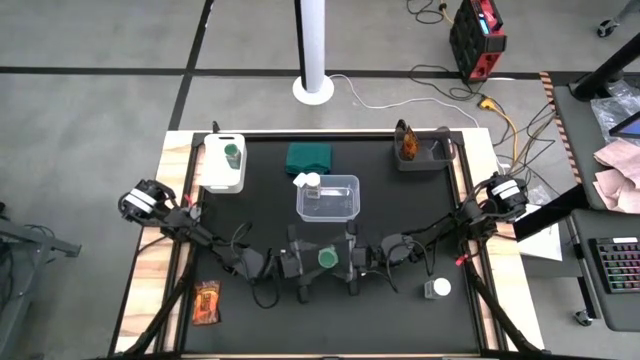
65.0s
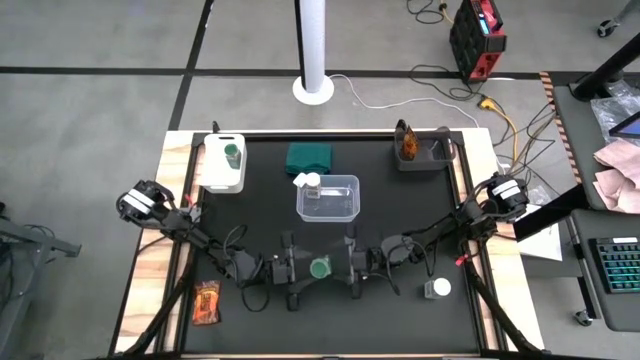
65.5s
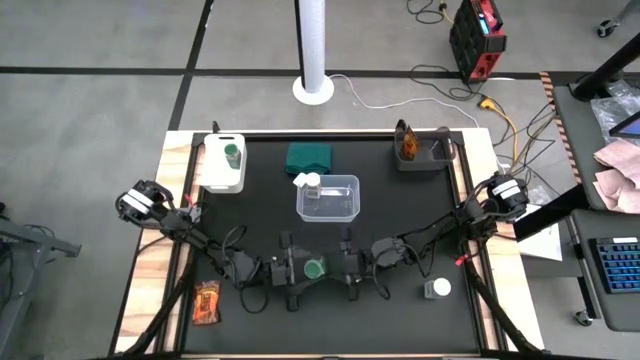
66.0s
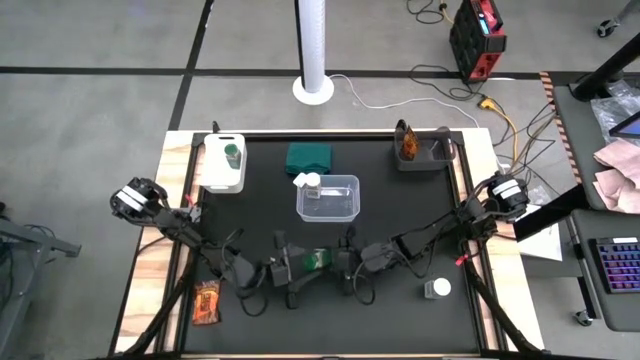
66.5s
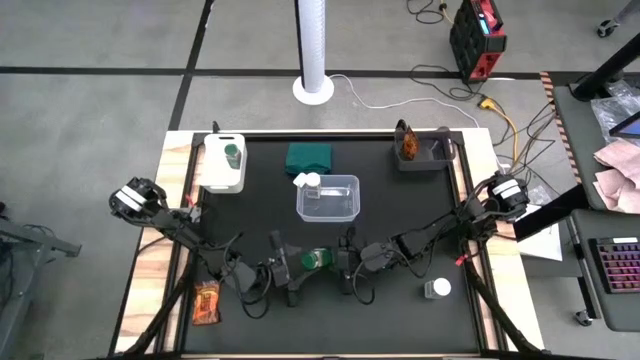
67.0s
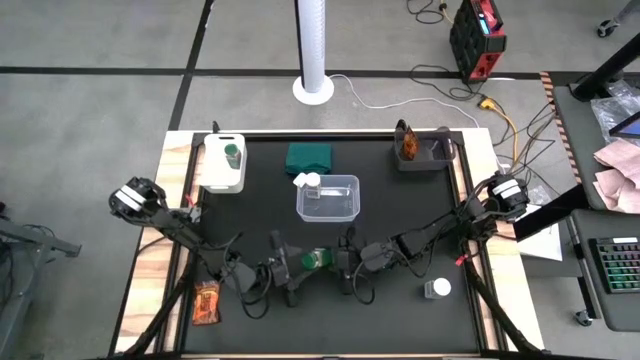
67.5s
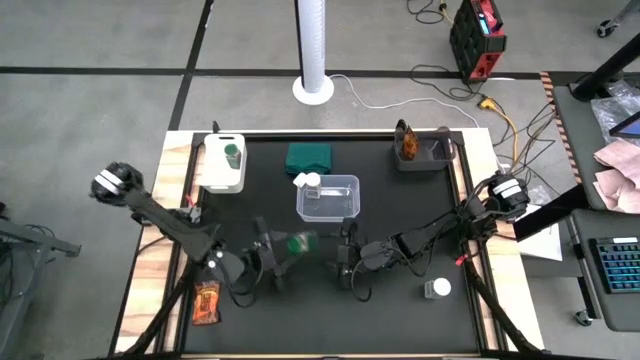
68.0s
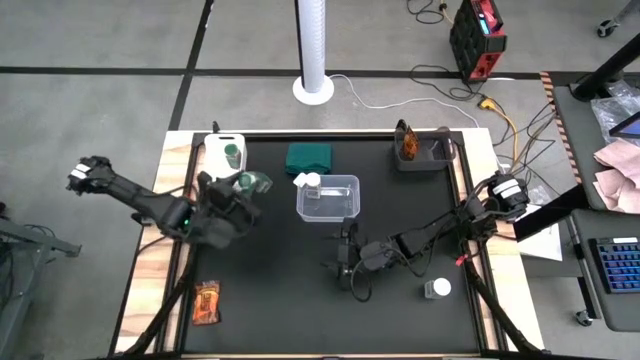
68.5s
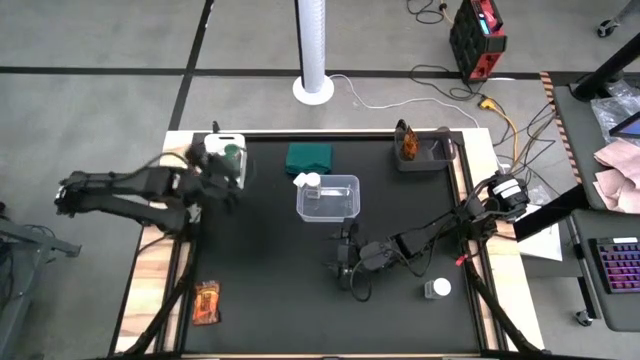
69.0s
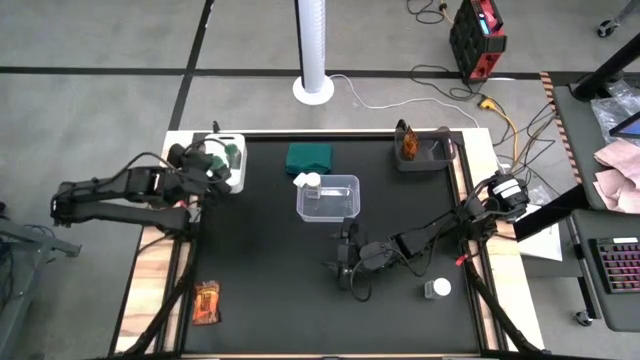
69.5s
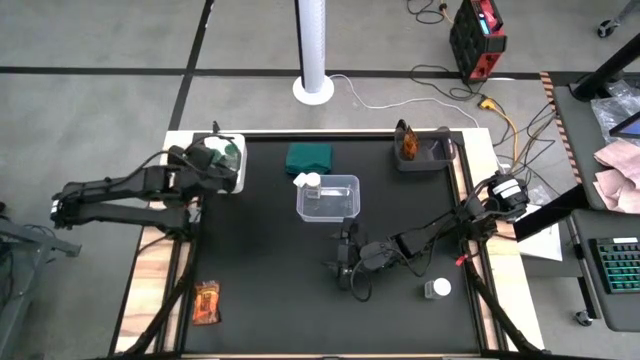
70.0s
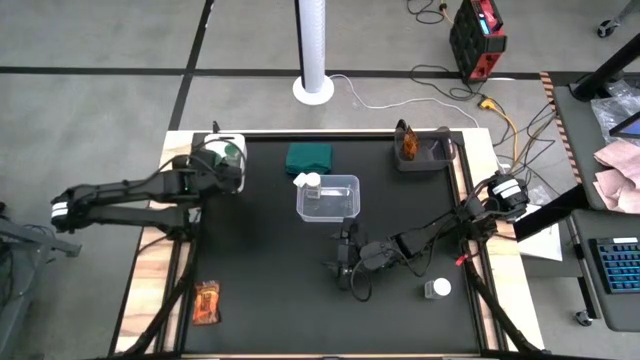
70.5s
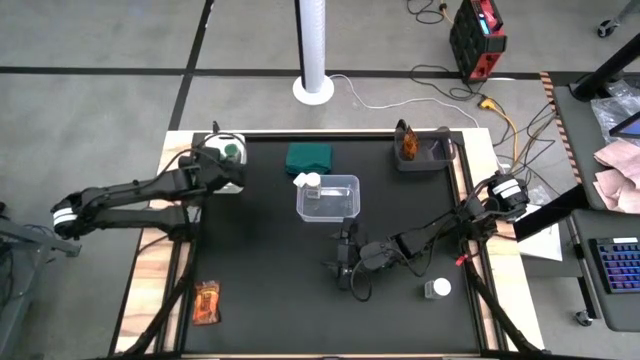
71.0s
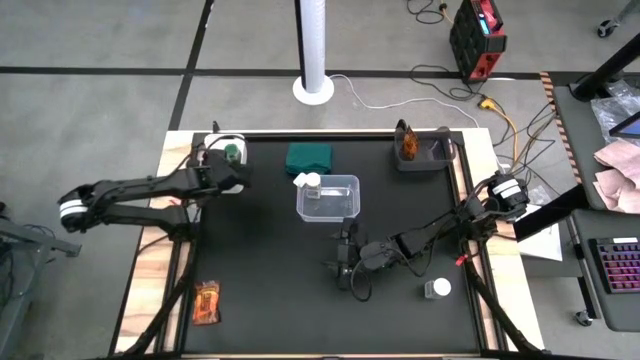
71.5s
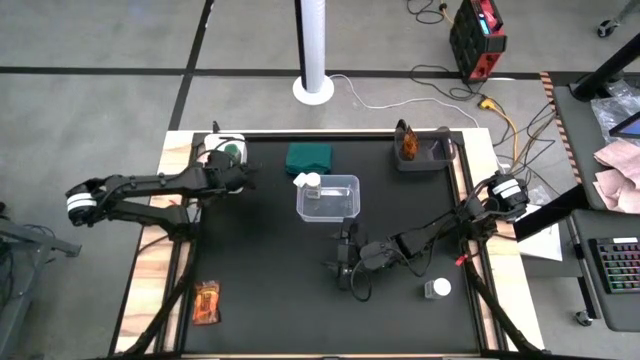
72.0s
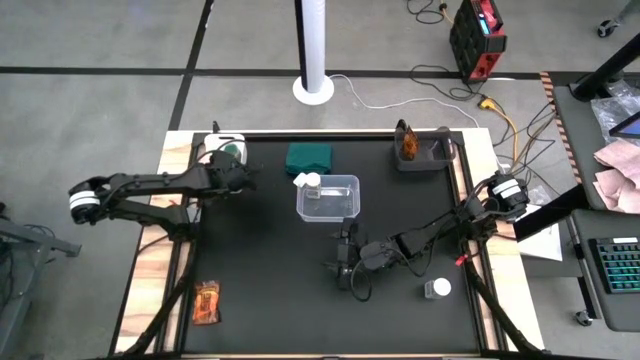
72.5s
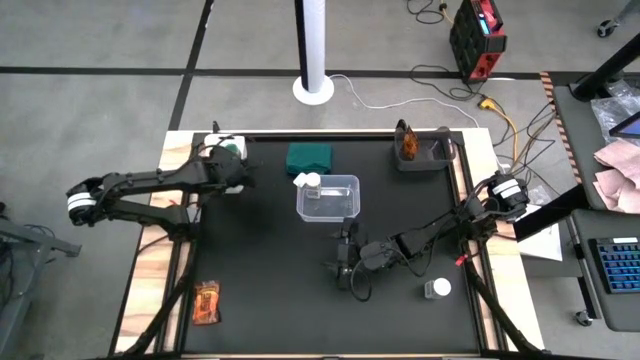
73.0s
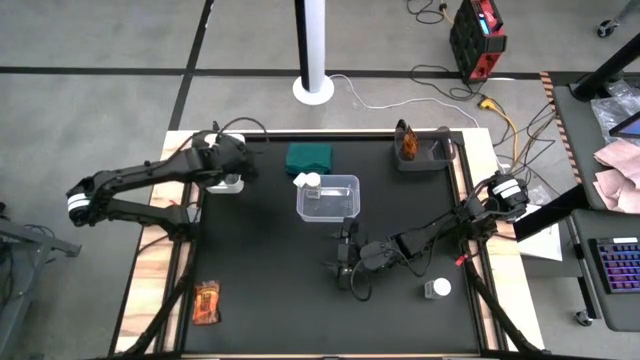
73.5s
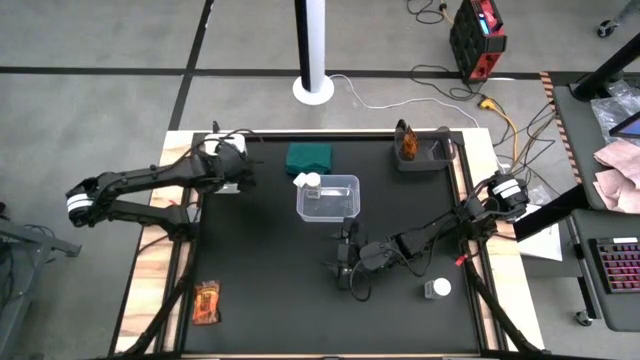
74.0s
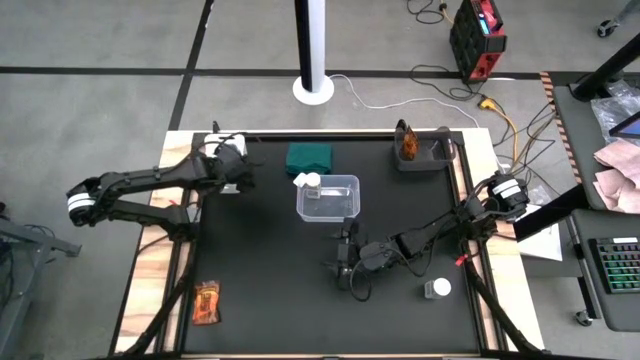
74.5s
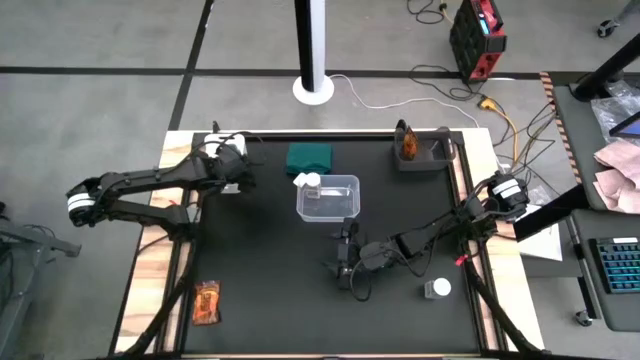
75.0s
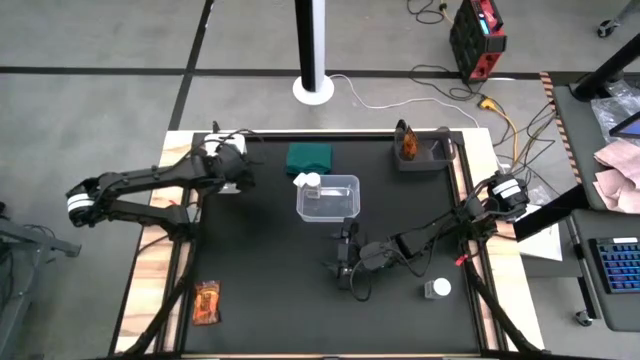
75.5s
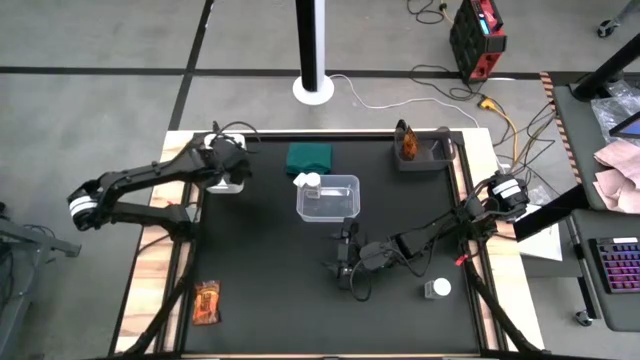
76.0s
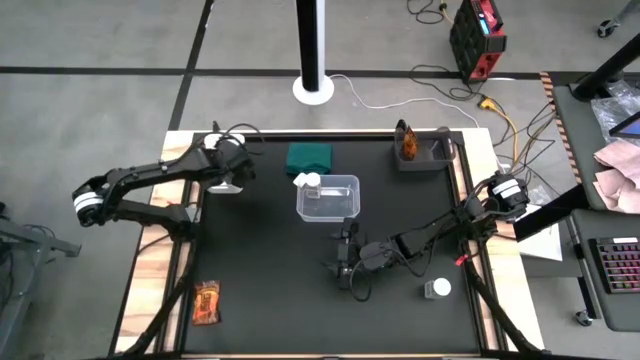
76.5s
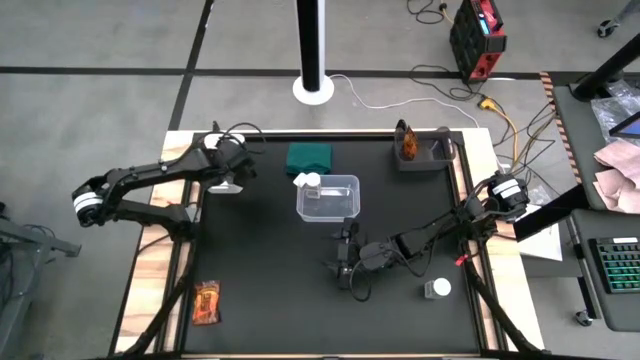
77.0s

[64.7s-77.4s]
Task: Sort spices by type
Put the green spice bottle into the white bin

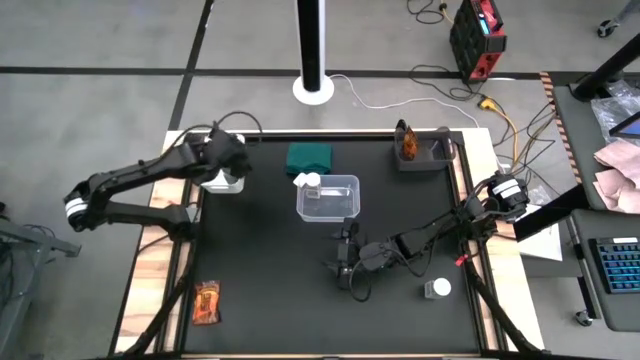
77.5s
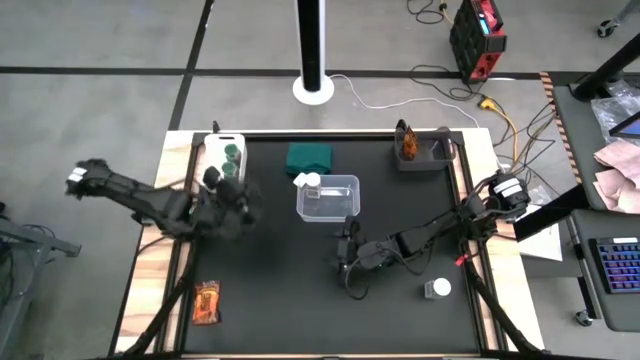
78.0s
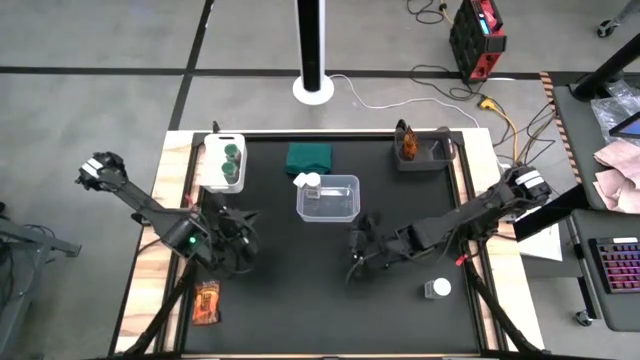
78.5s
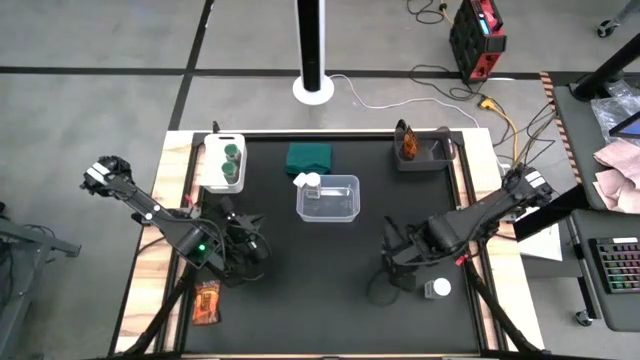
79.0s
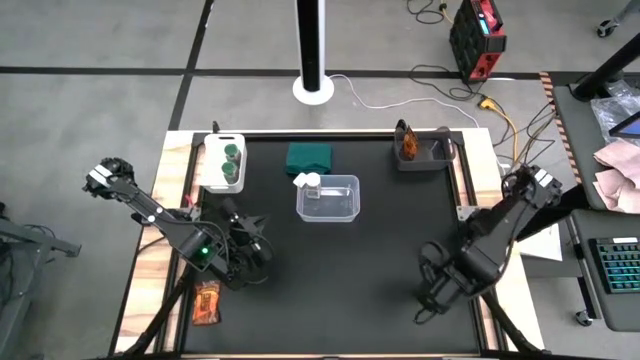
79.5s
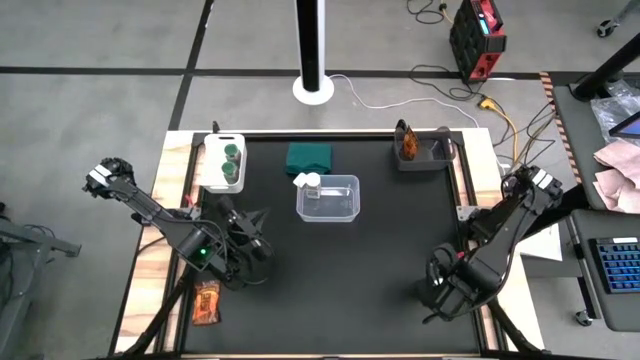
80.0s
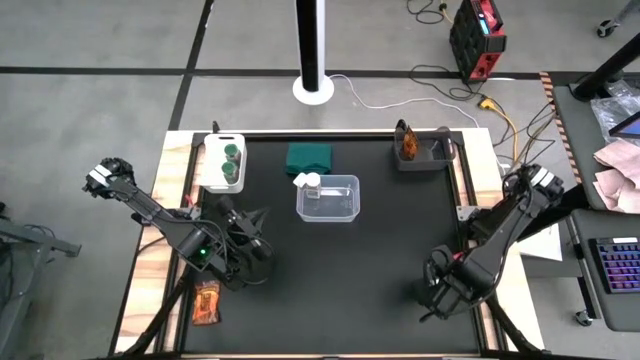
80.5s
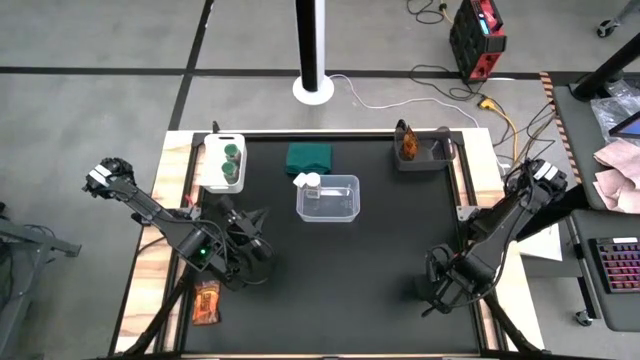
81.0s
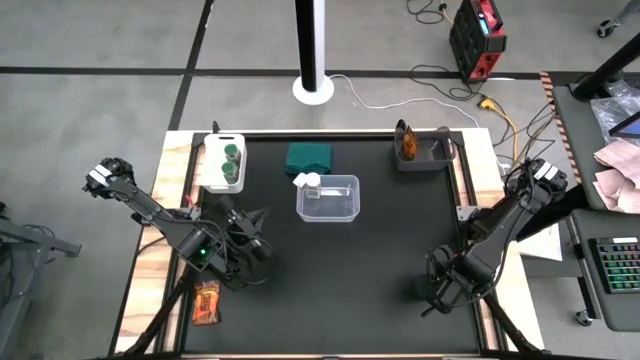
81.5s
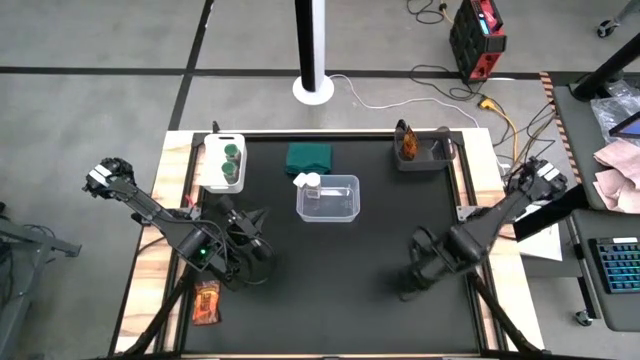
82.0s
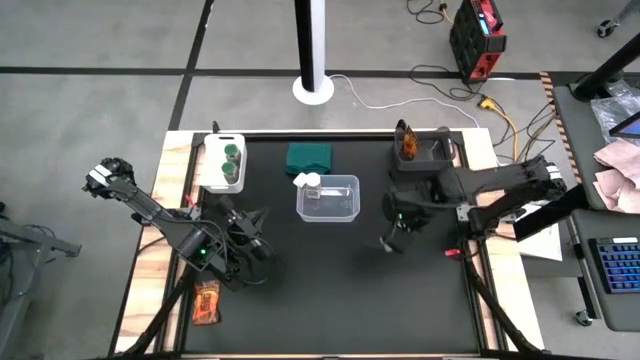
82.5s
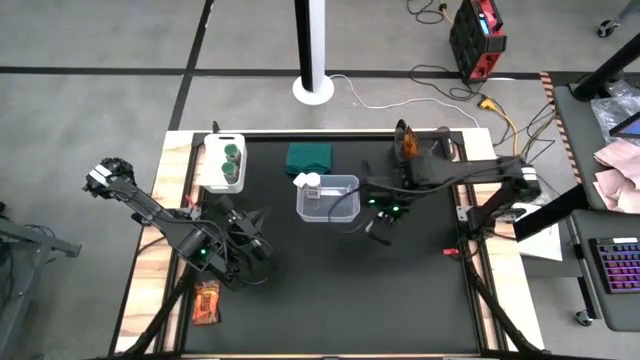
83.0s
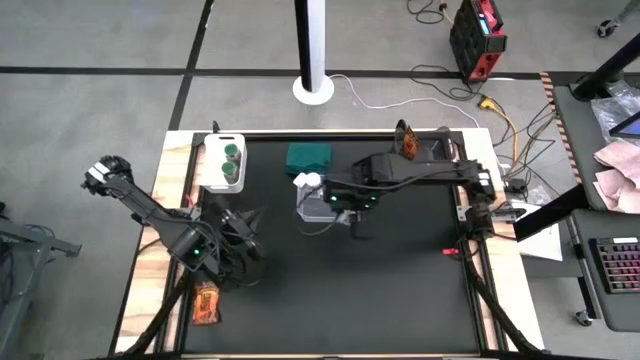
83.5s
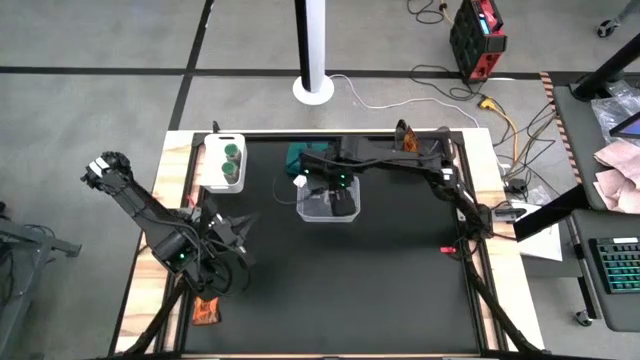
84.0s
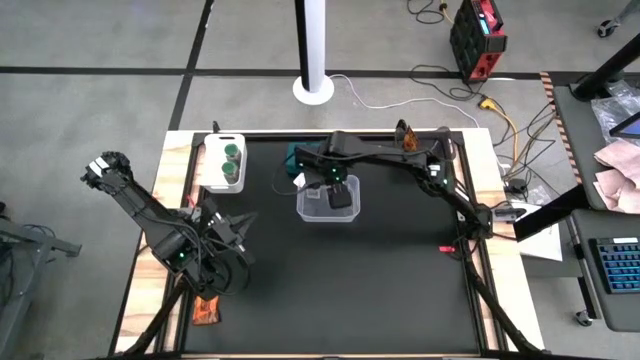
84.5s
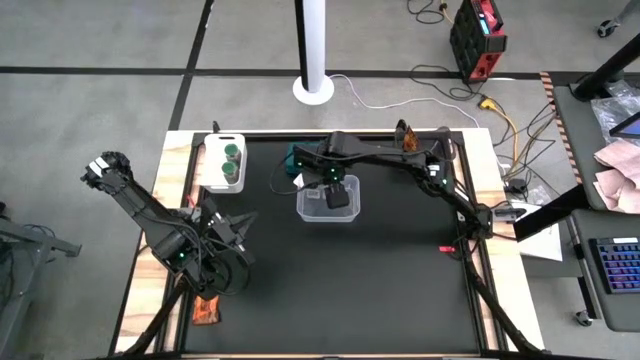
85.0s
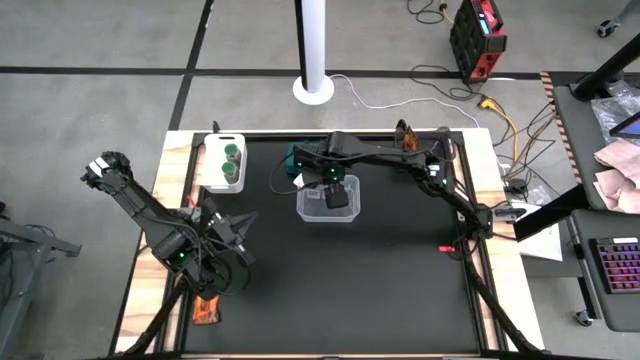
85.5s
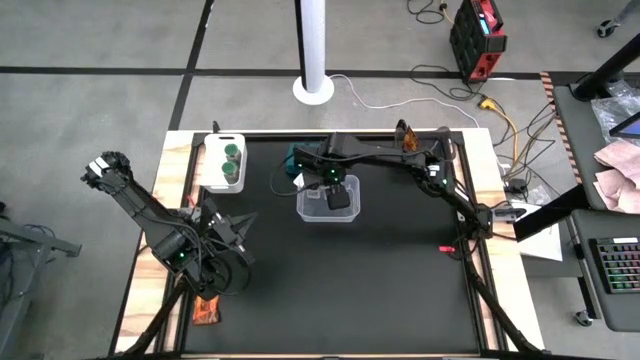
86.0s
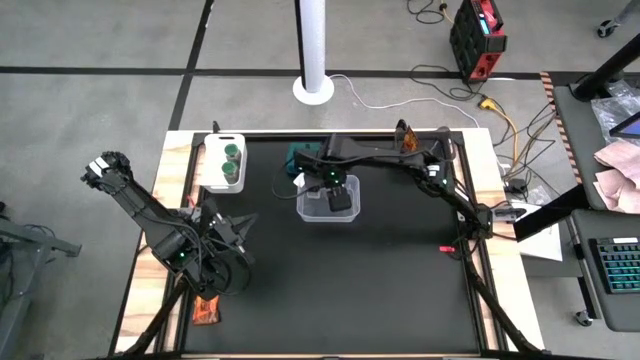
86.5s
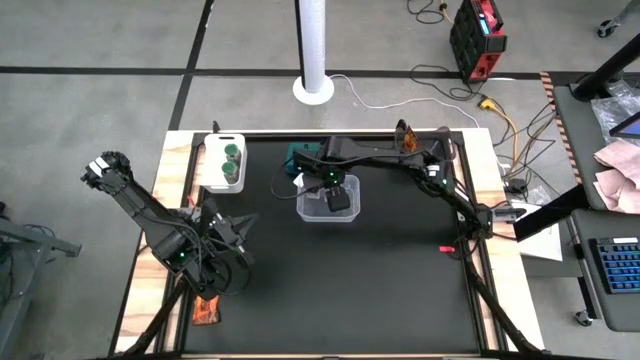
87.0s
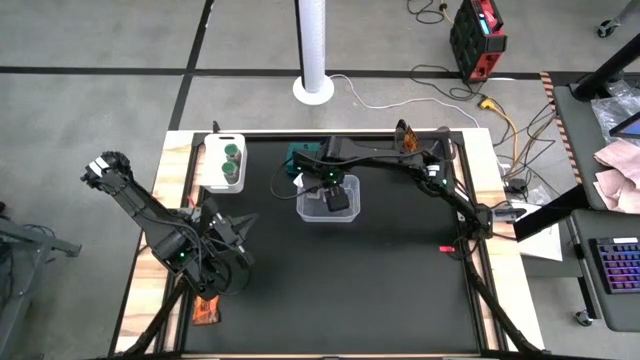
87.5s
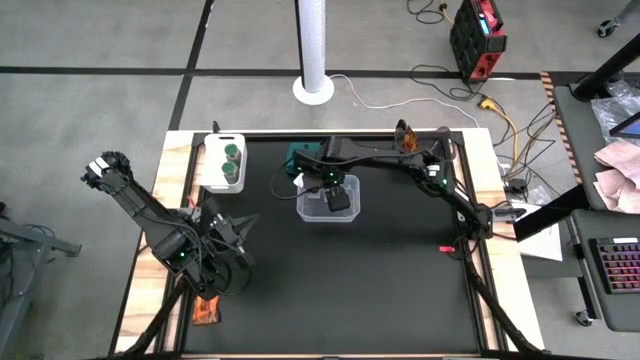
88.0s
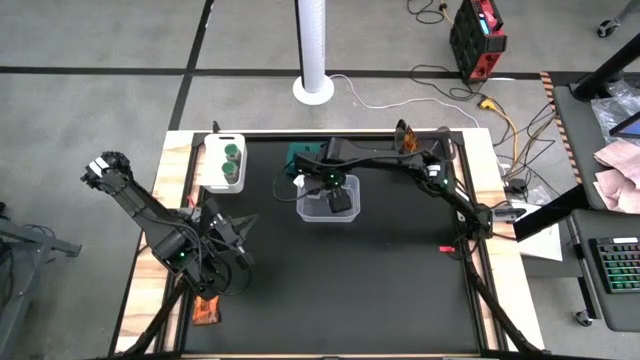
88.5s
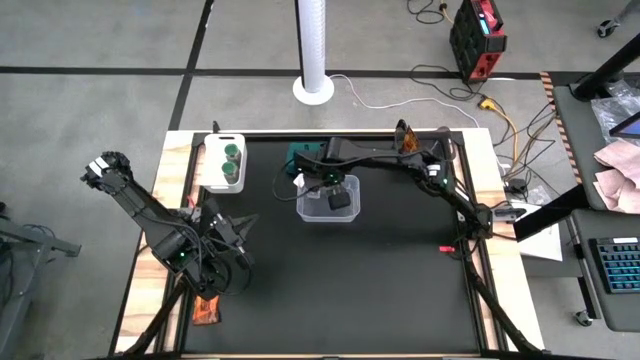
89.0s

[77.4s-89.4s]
Put the white spice bottle into the transparent bin
